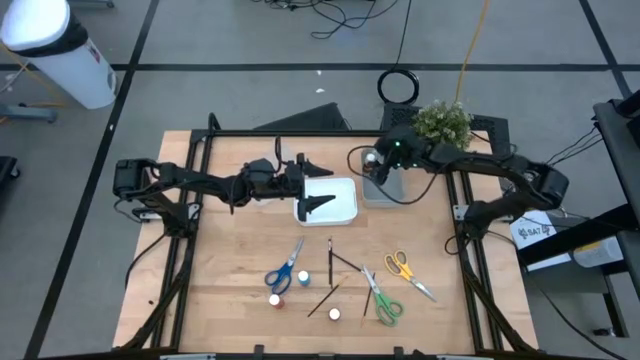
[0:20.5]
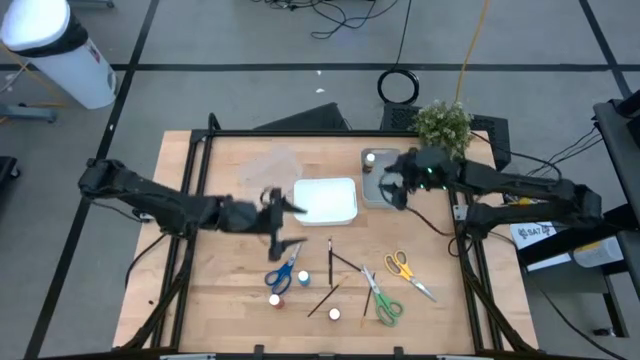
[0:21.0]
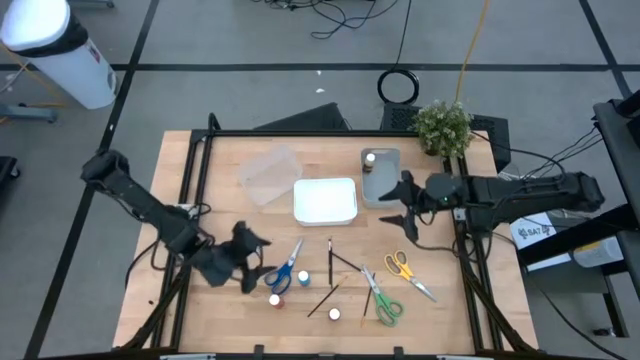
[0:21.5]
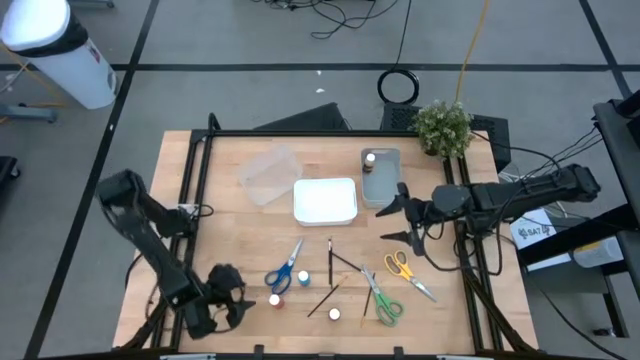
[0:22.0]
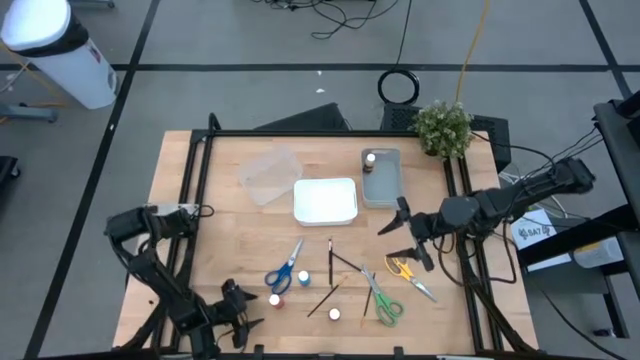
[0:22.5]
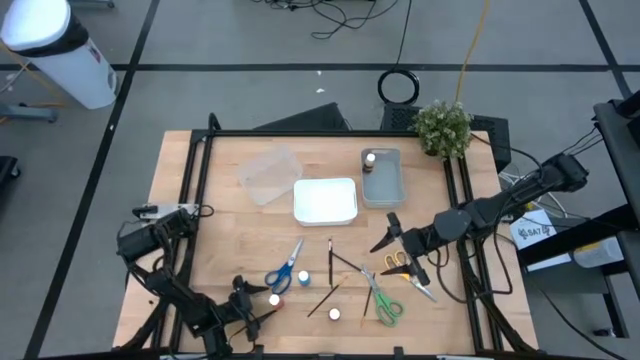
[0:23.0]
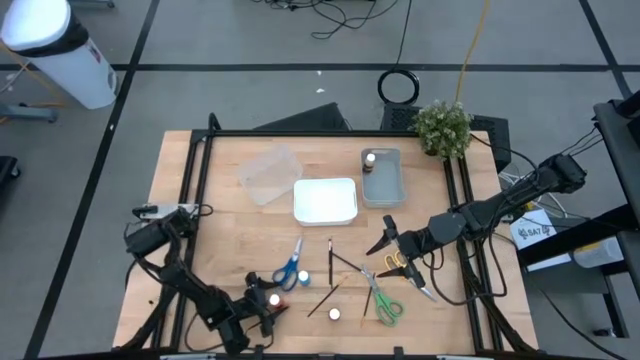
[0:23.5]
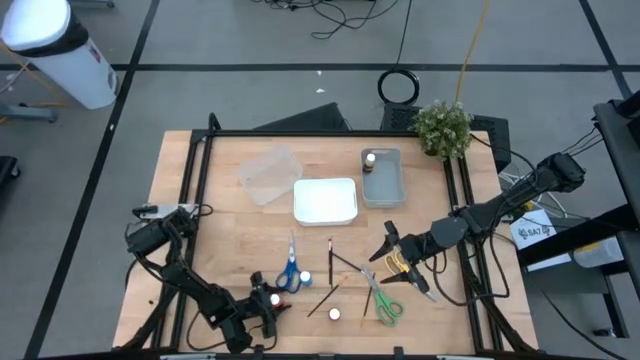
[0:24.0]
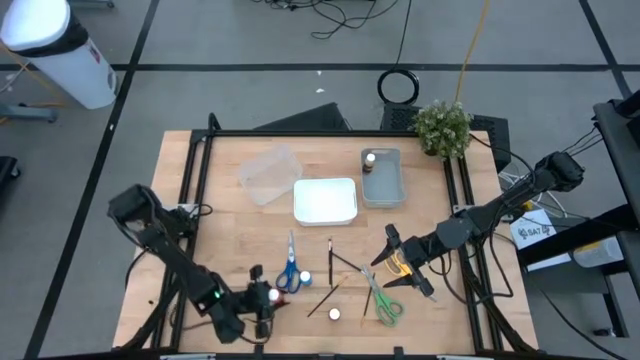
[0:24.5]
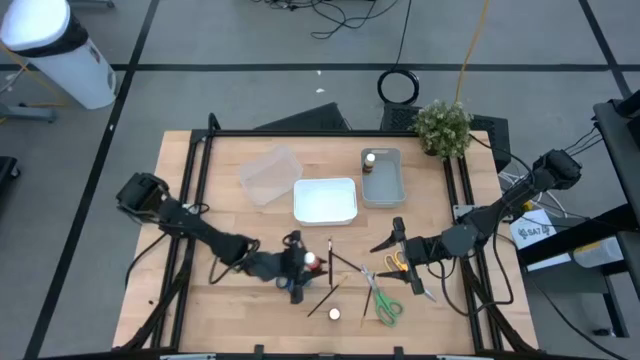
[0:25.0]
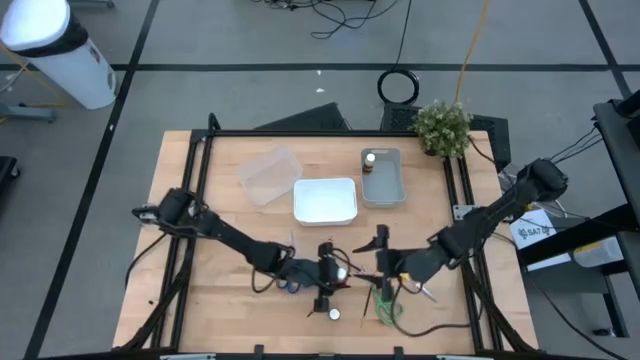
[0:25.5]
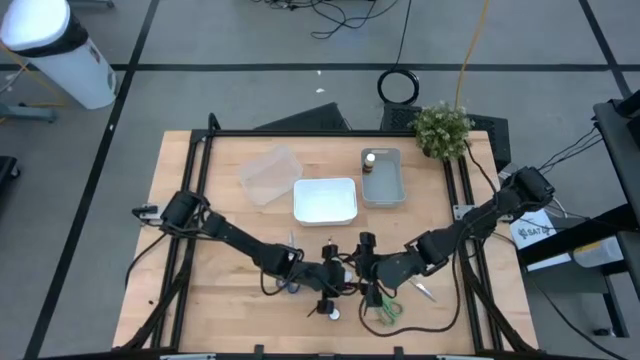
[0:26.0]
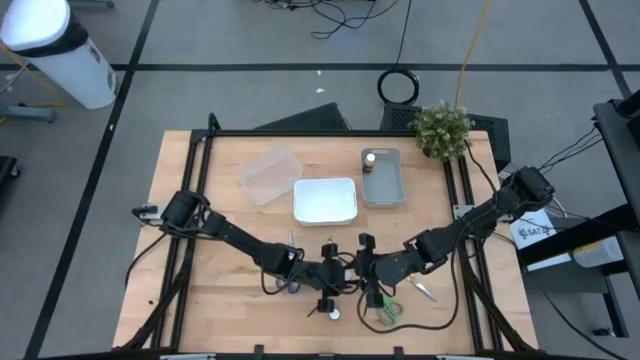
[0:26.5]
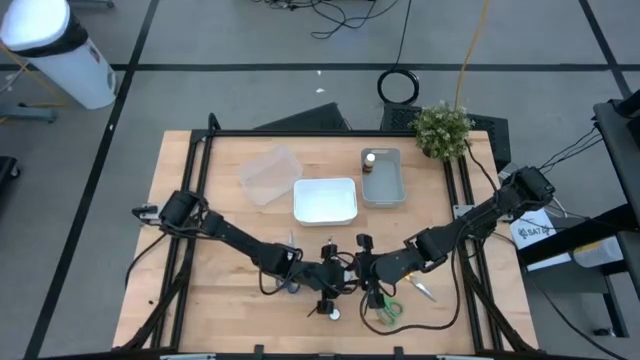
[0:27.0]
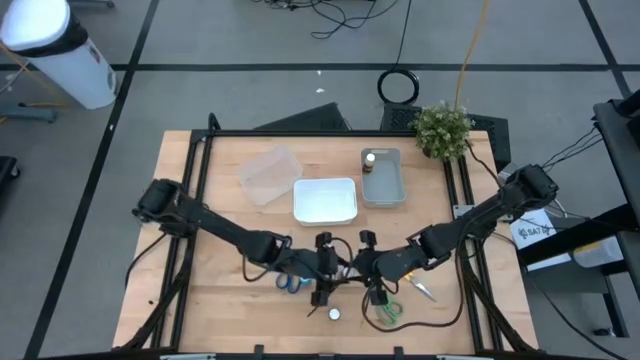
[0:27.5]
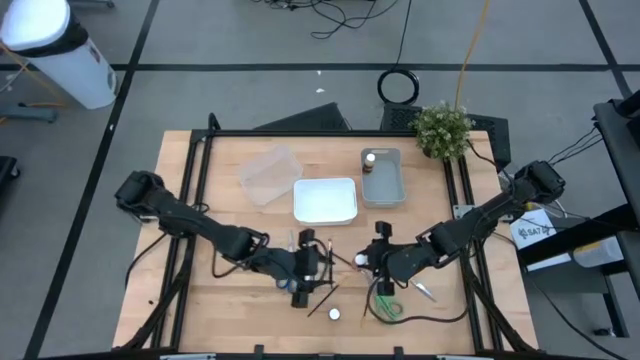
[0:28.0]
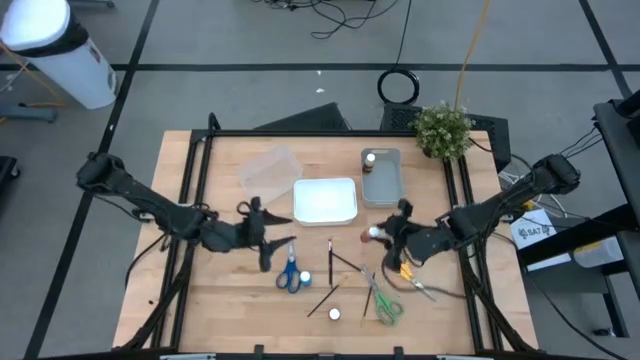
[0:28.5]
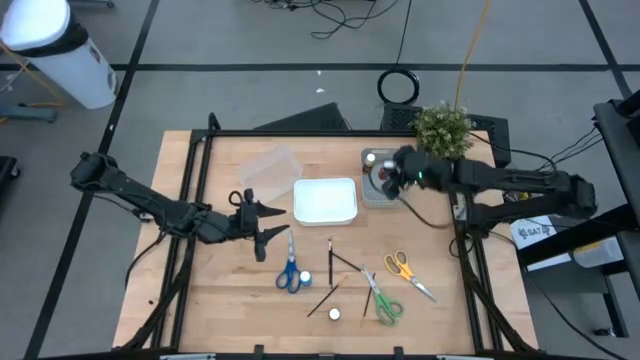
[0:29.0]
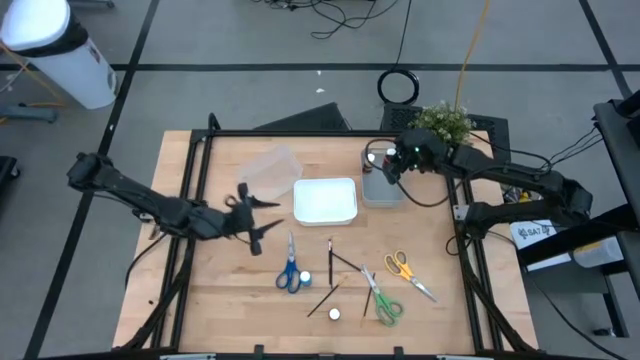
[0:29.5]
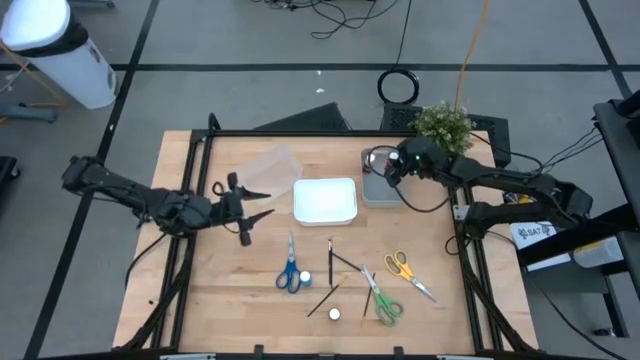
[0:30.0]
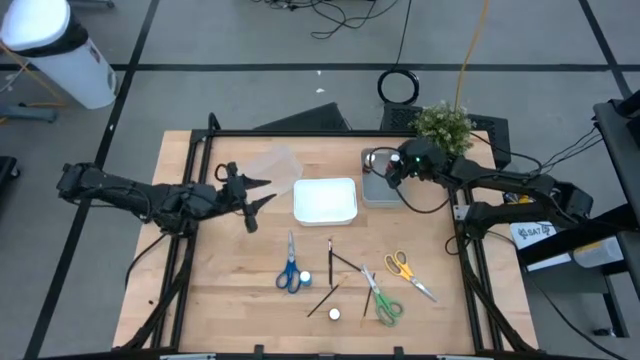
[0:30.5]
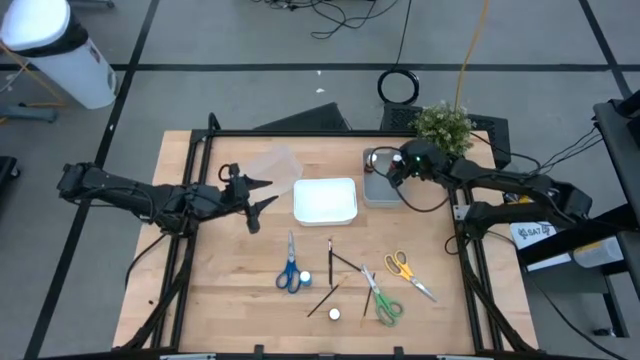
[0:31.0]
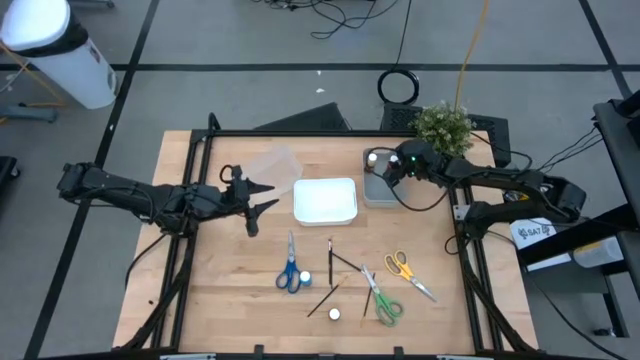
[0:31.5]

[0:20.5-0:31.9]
Task: Pick & Place Paint Supplies
Put the left orange paint bottle in the gray bin

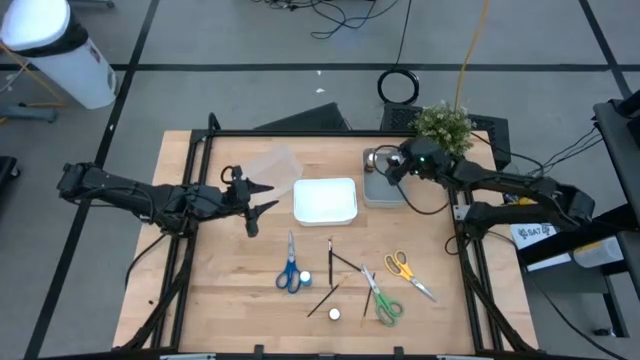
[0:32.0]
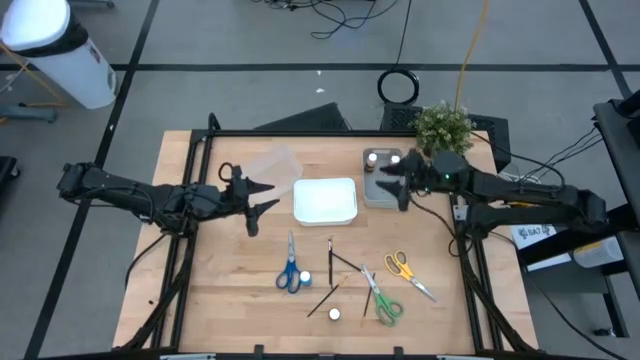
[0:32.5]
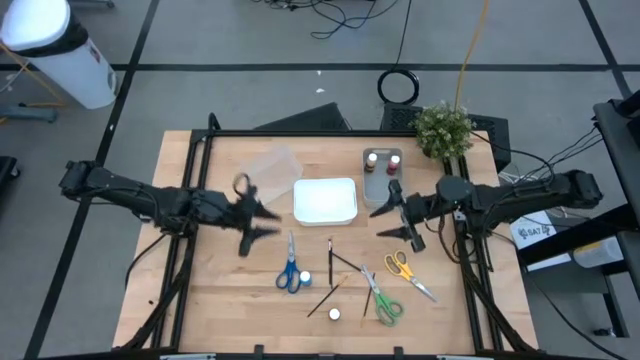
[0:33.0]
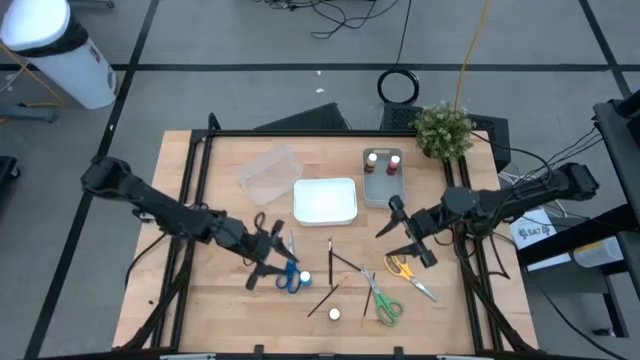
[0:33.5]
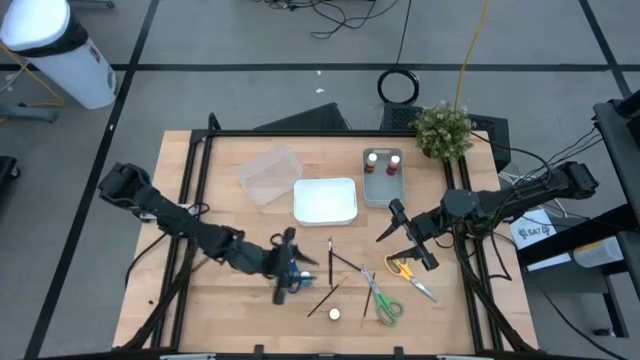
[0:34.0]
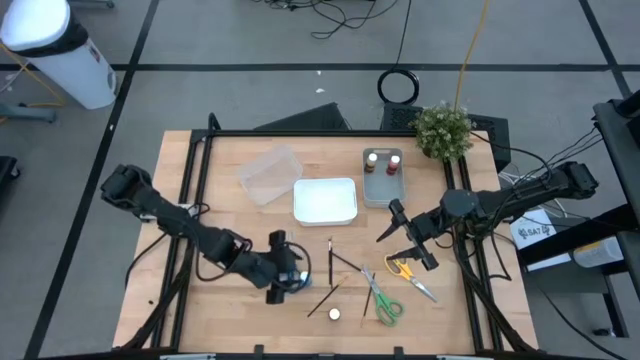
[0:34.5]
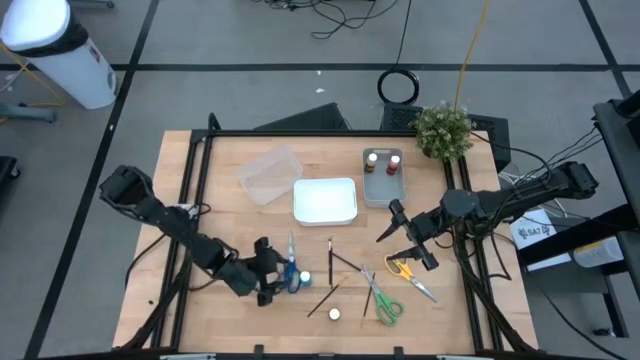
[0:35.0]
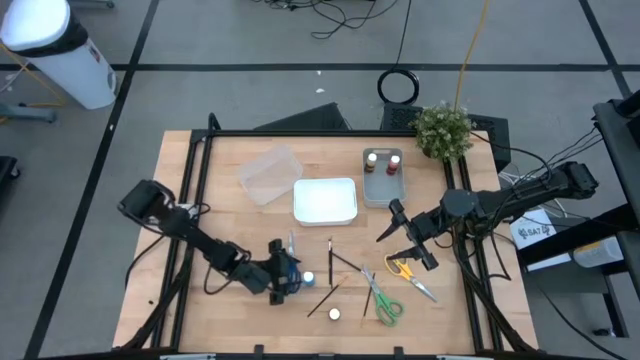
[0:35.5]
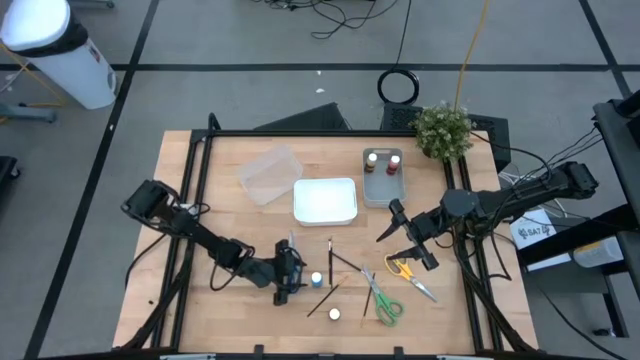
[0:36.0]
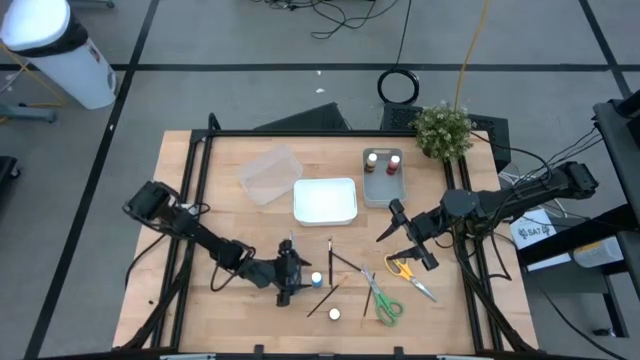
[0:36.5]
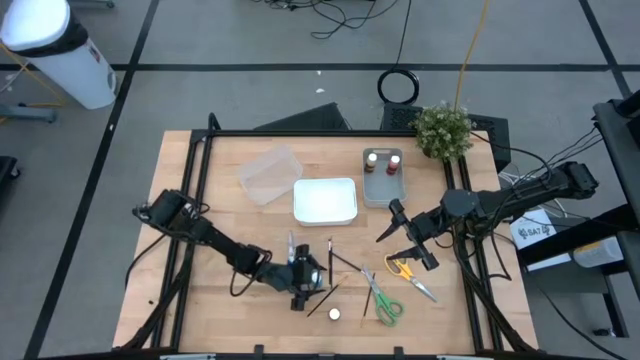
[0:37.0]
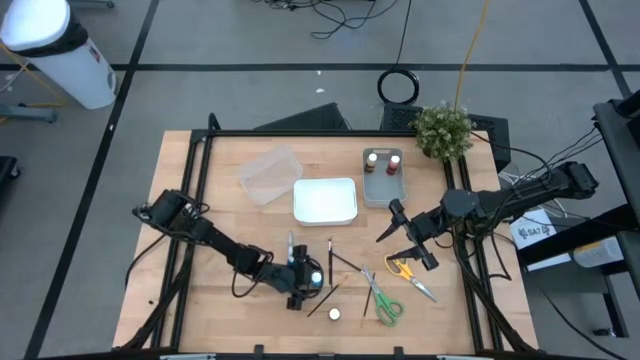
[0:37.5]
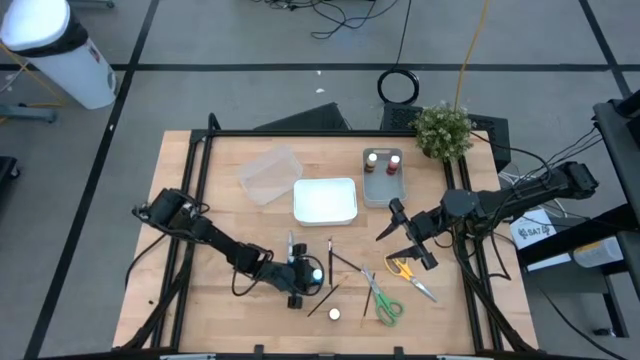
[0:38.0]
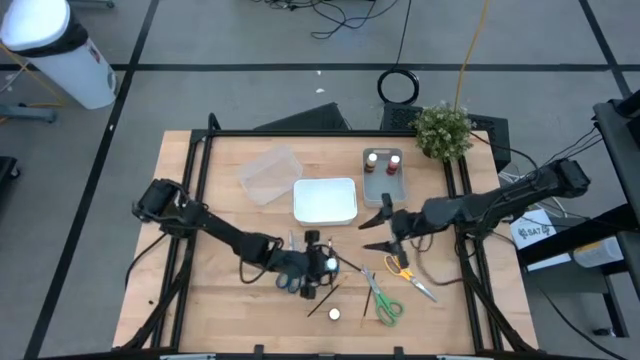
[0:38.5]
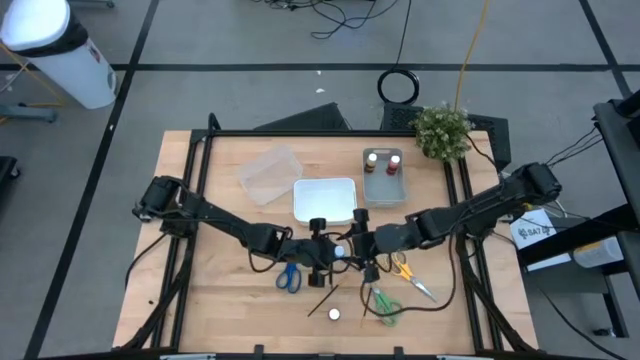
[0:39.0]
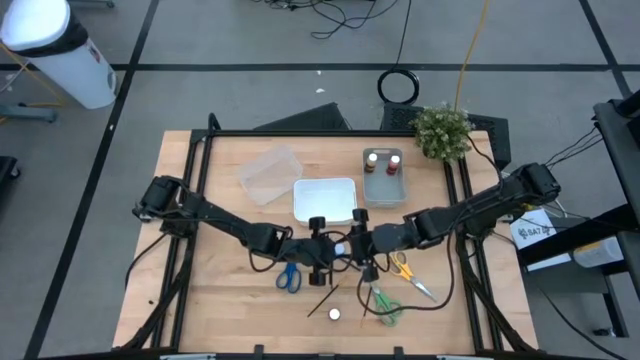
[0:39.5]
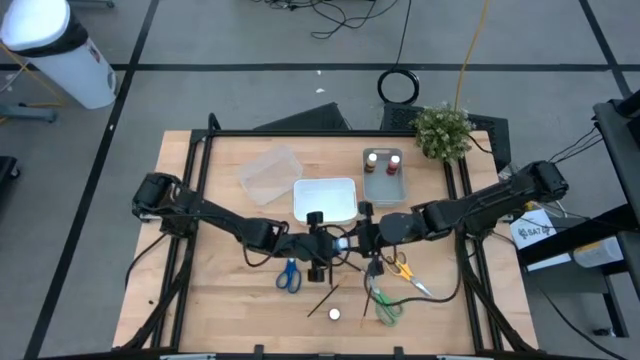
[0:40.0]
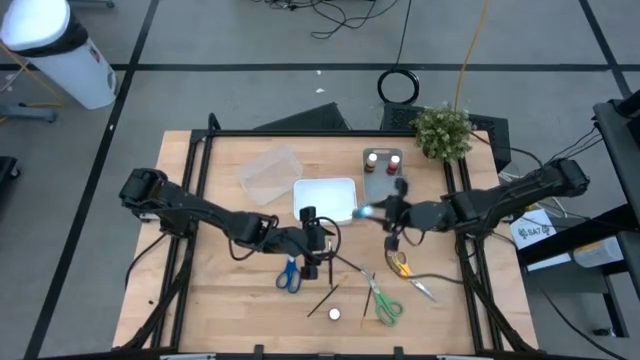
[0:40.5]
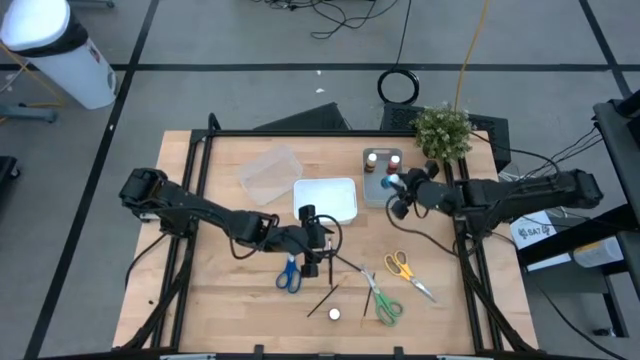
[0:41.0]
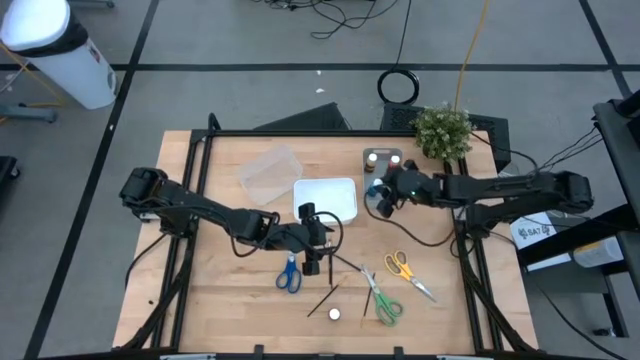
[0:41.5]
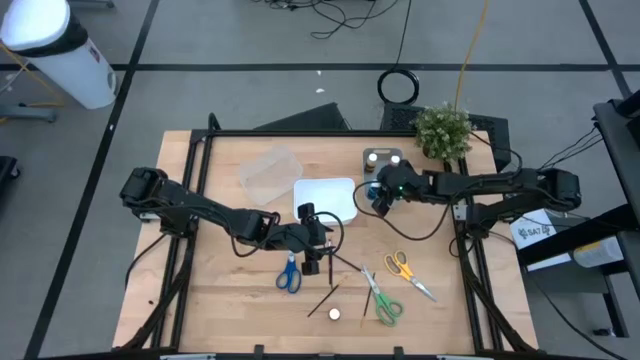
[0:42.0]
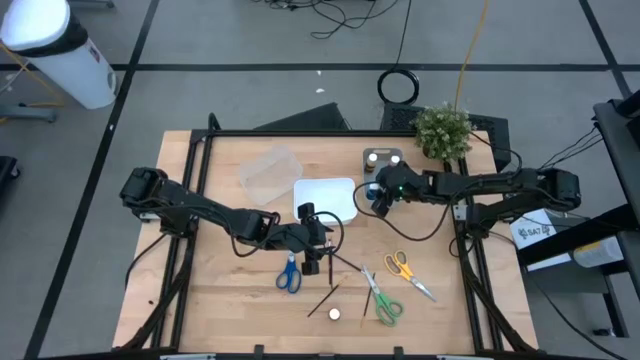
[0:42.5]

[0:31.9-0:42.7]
Put the blue paint bottle in the gray bin
